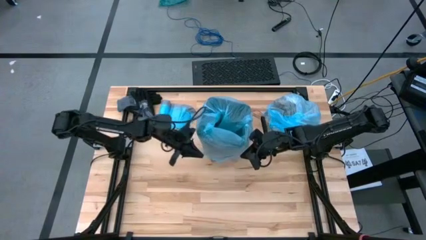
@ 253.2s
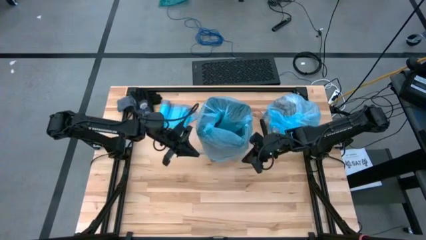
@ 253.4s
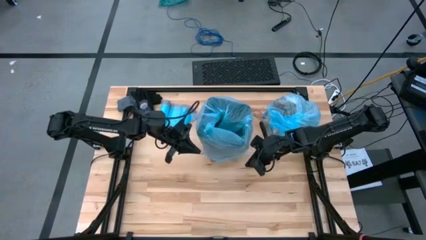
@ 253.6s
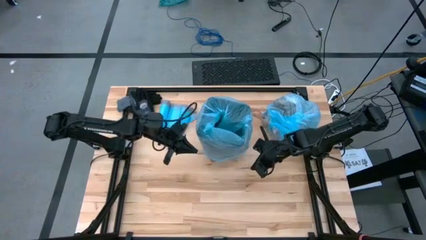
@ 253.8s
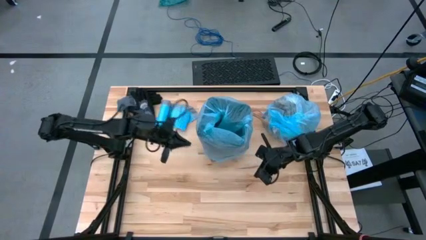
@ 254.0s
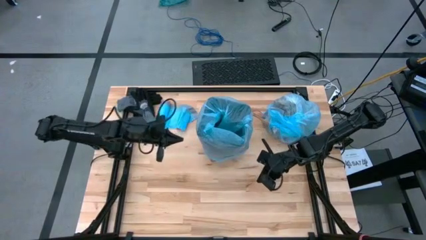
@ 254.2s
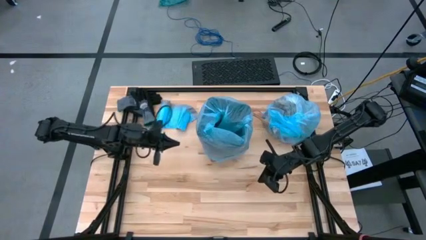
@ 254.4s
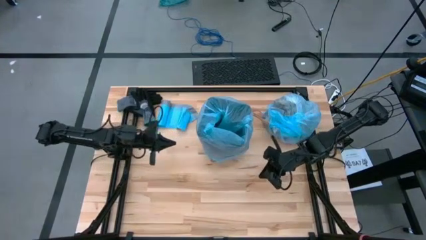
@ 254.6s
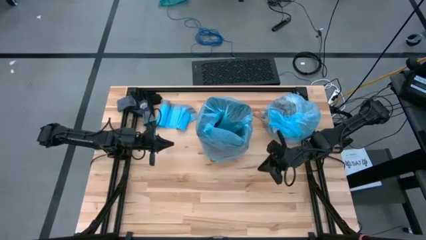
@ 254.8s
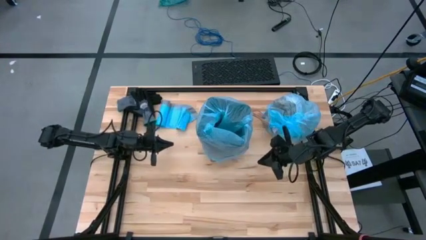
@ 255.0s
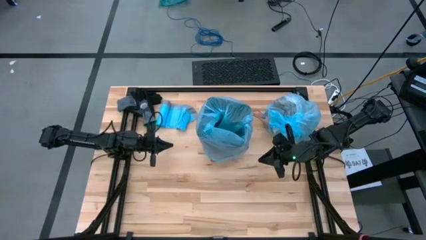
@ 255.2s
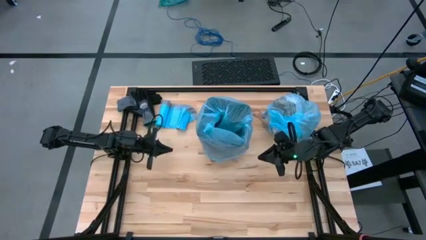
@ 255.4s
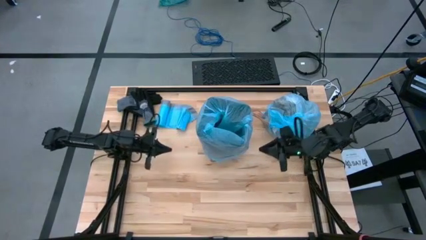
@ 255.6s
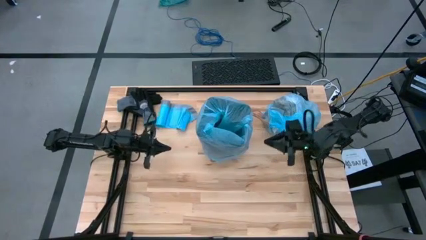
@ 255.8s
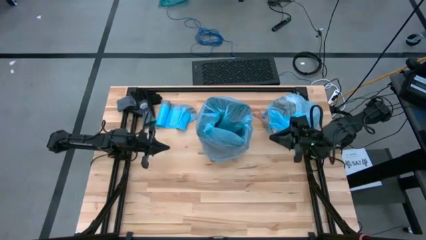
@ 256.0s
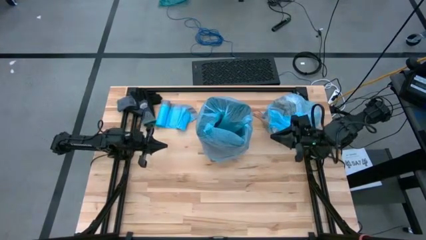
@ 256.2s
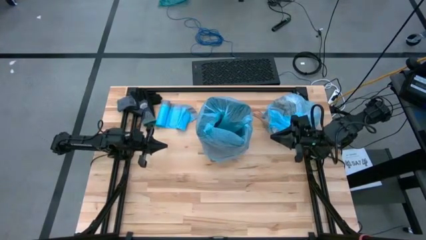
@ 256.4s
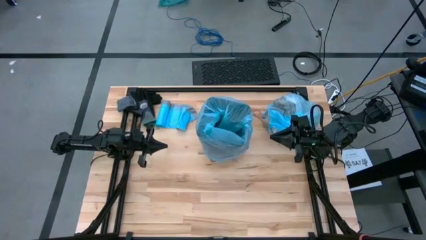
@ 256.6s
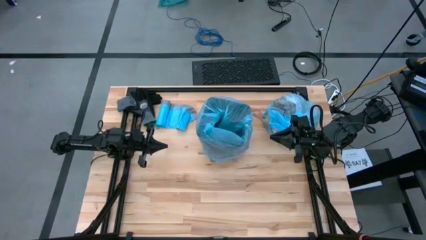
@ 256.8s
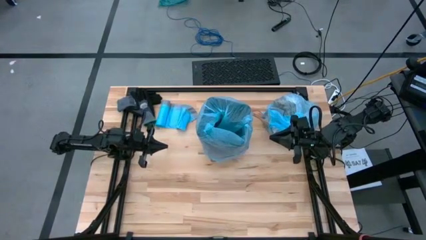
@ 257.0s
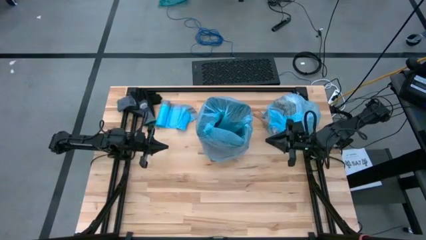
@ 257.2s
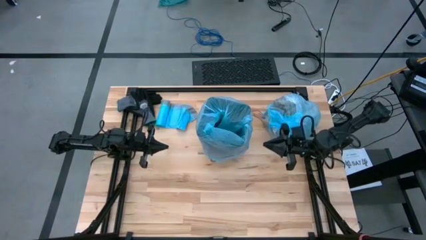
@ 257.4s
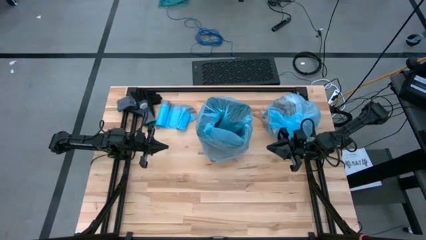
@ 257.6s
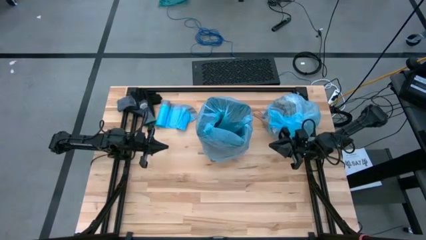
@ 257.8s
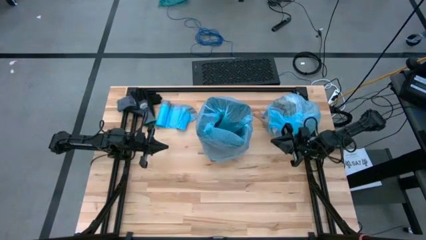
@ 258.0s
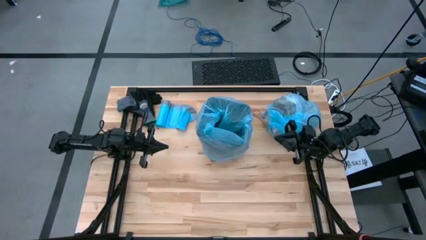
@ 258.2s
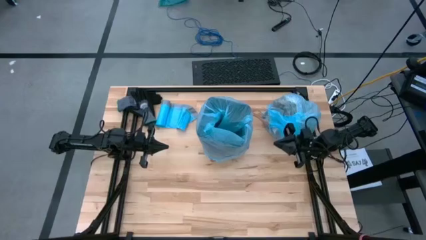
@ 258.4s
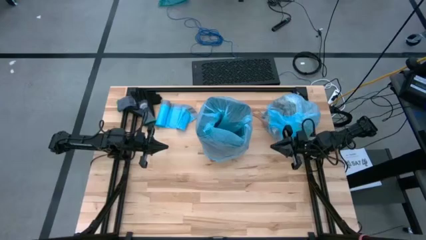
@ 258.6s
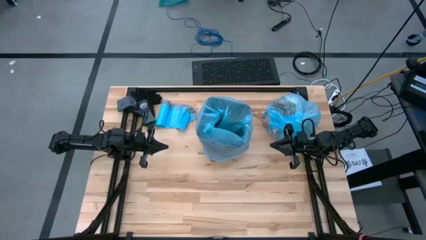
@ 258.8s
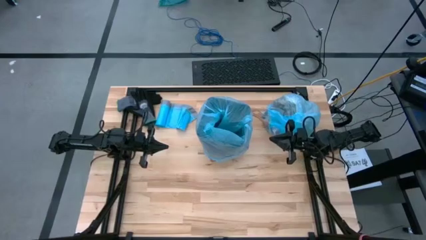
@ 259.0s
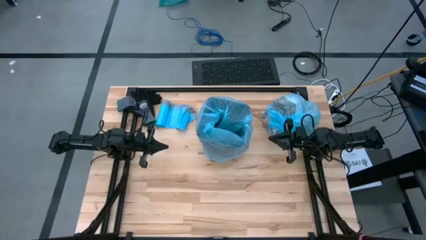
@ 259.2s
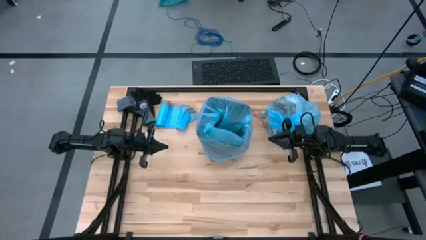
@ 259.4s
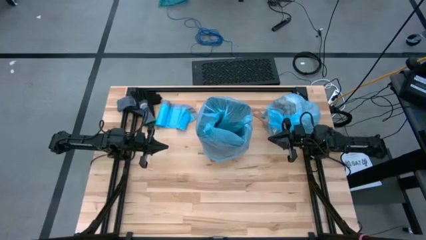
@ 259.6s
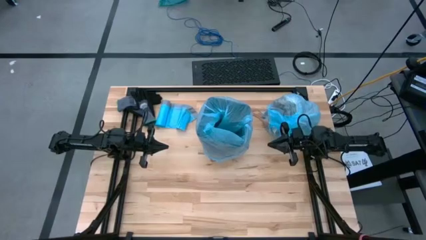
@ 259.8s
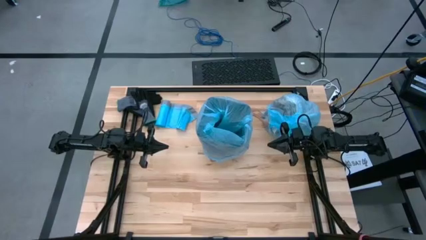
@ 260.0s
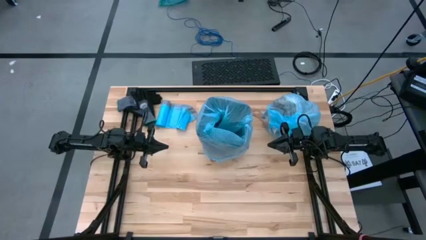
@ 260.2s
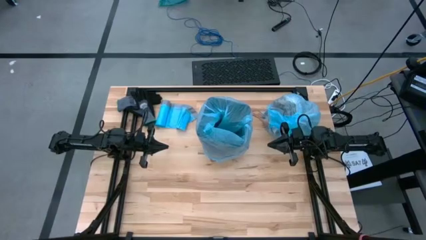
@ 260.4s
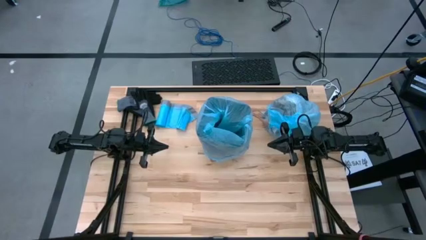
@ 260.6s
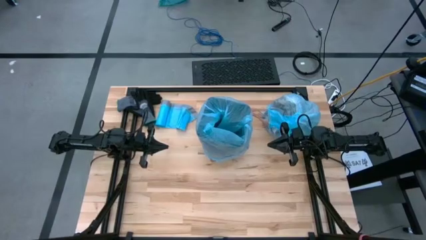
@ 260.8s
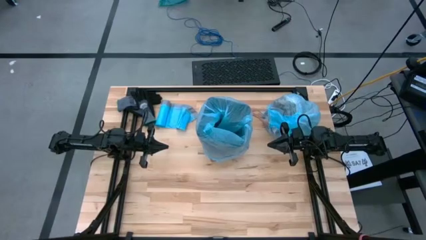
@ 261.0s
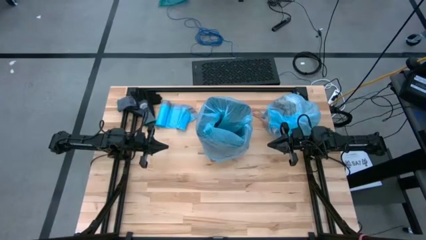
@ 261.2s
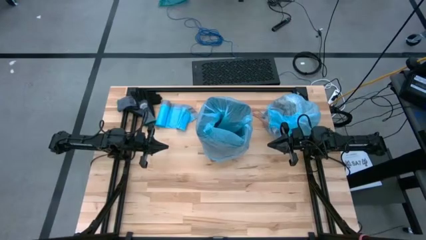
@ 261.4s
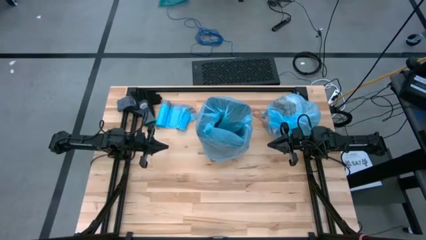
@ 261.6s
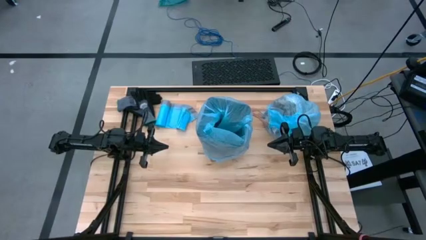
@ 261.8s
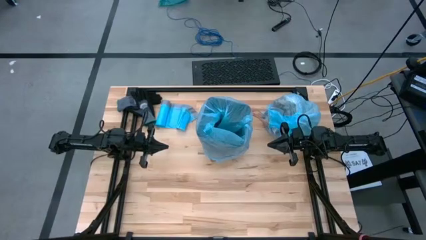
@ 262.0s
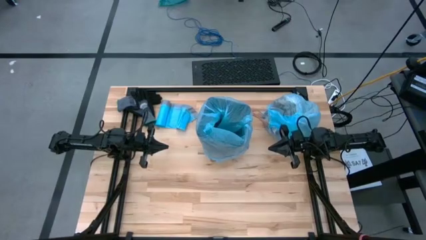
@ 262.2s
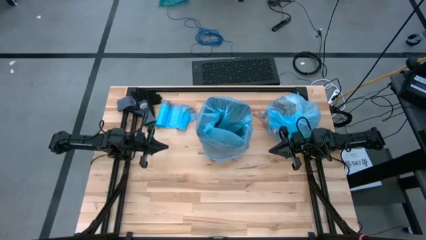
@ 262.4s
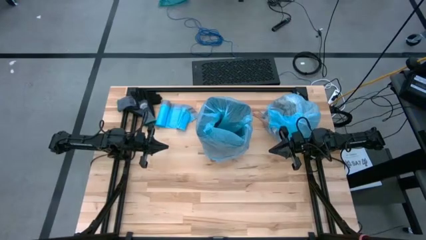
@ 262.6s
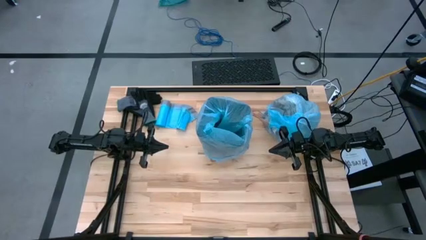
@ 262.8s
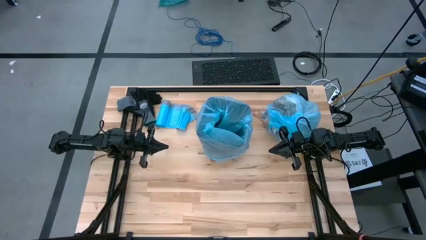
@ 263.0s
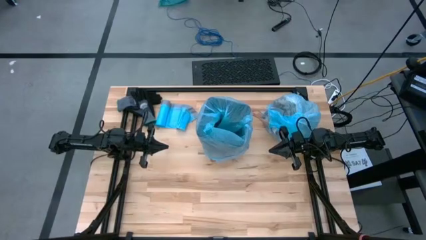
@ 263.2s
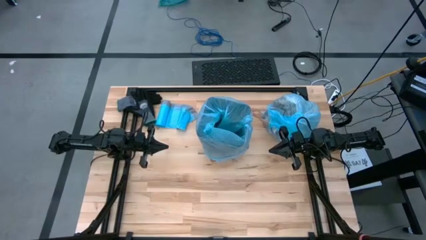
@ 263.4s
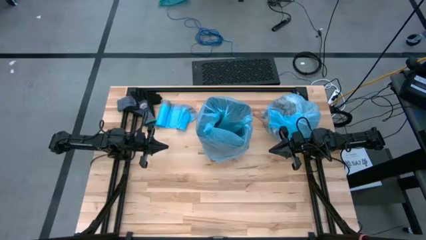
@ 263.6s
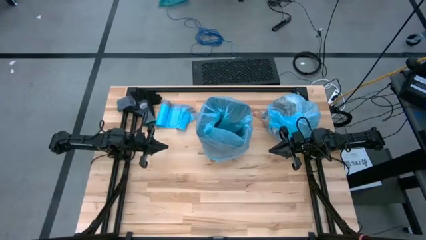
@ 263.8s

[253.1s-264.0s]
Task: place trash/remove bag and relplace
Return to Home Position
